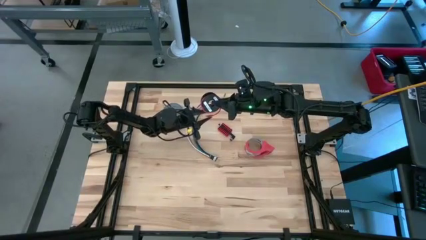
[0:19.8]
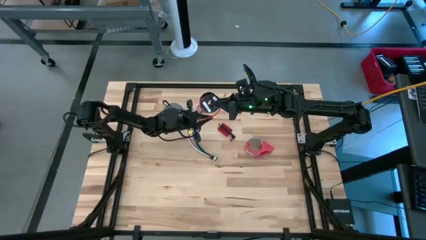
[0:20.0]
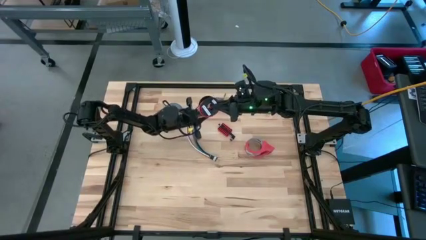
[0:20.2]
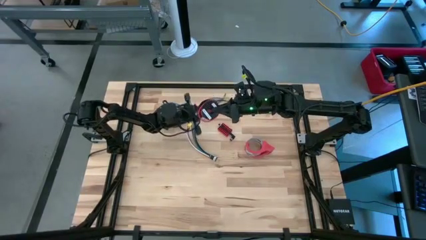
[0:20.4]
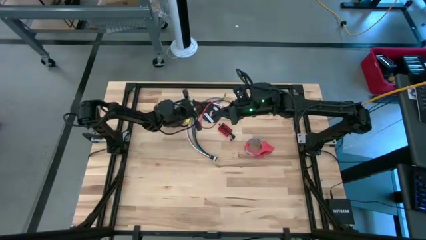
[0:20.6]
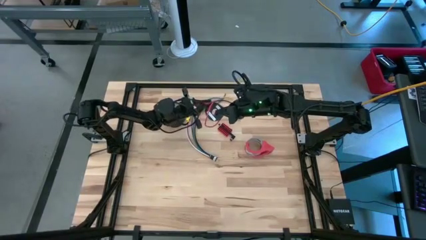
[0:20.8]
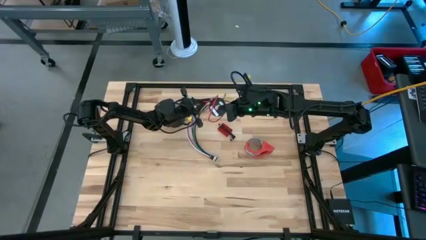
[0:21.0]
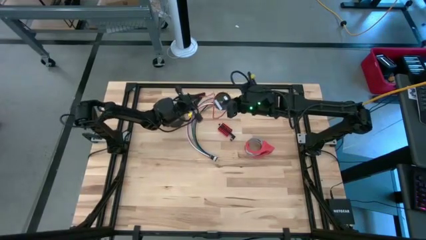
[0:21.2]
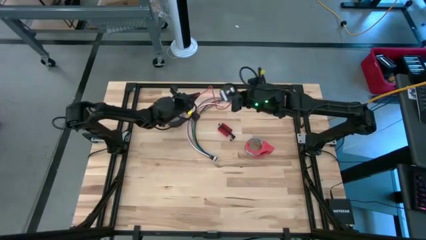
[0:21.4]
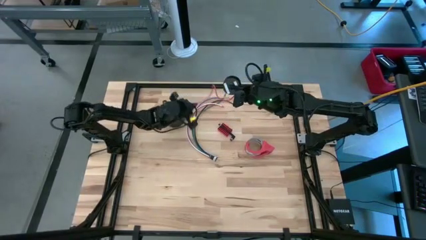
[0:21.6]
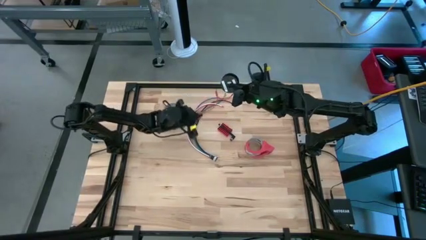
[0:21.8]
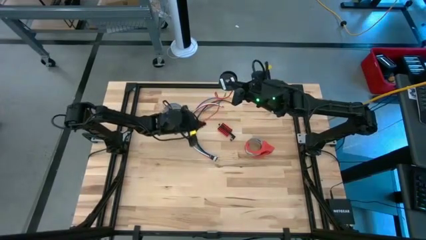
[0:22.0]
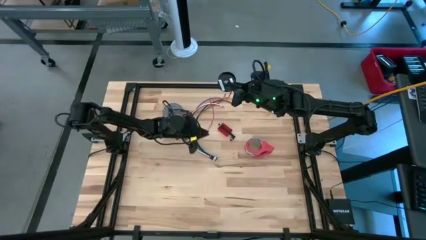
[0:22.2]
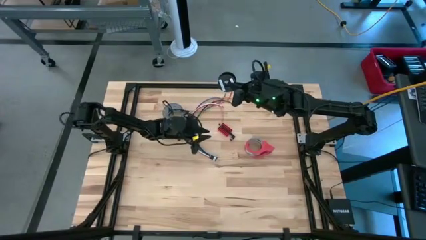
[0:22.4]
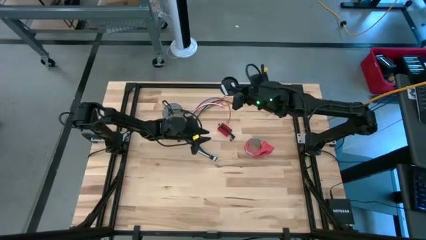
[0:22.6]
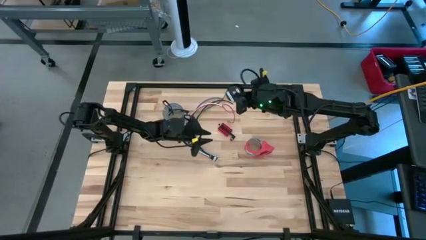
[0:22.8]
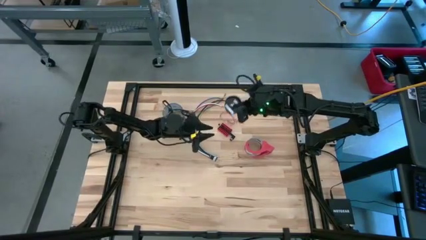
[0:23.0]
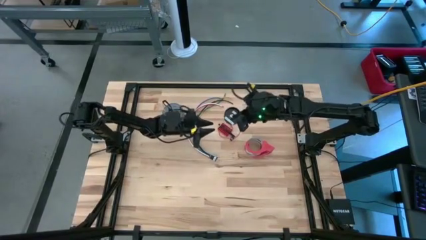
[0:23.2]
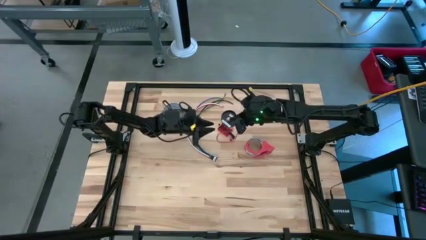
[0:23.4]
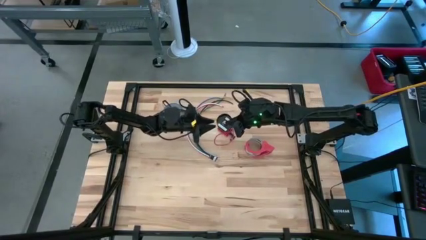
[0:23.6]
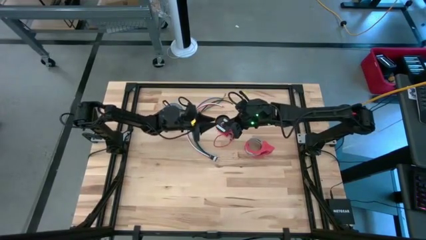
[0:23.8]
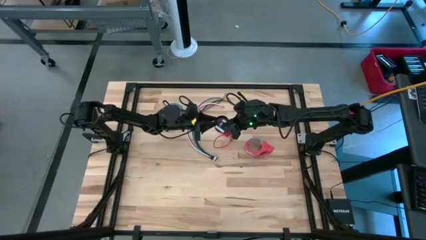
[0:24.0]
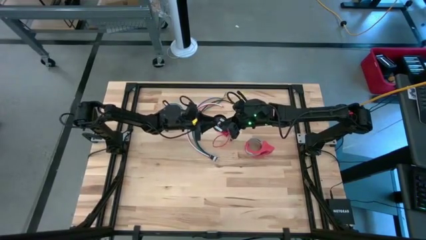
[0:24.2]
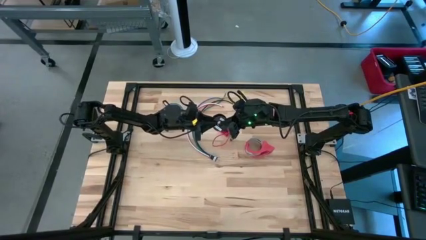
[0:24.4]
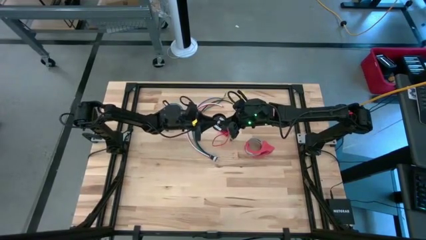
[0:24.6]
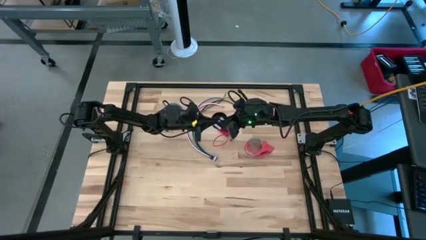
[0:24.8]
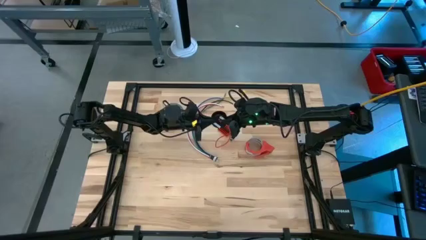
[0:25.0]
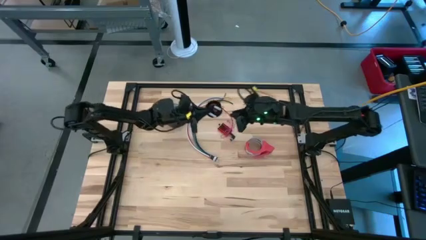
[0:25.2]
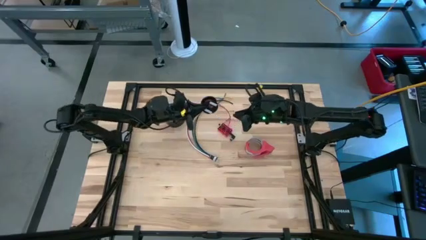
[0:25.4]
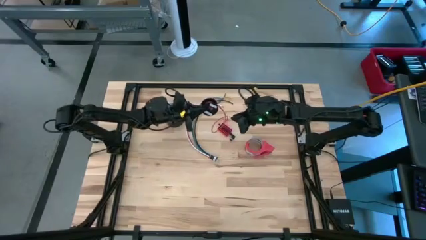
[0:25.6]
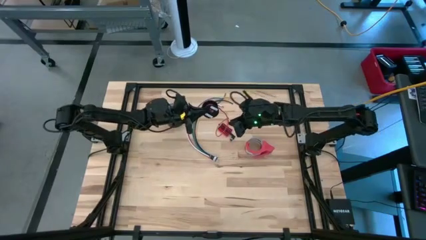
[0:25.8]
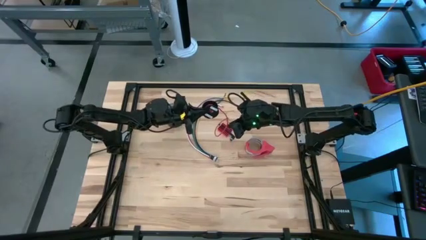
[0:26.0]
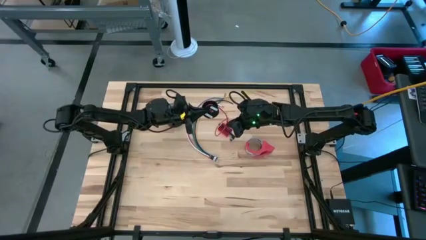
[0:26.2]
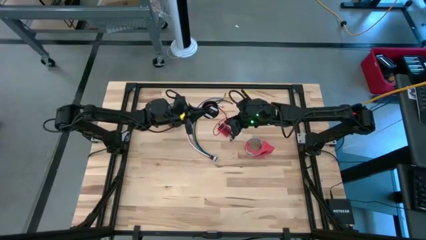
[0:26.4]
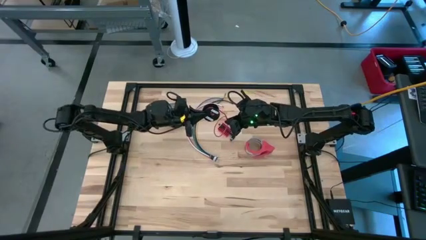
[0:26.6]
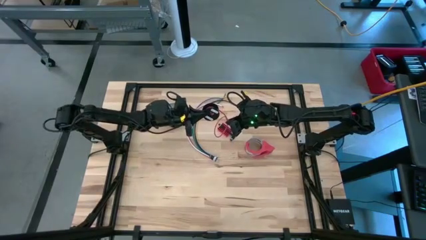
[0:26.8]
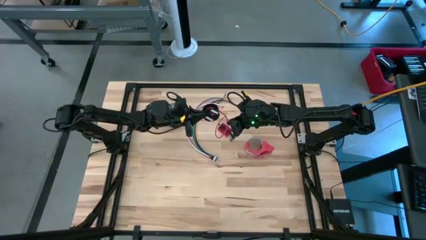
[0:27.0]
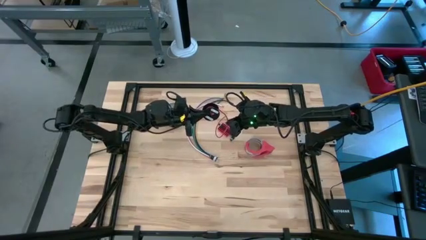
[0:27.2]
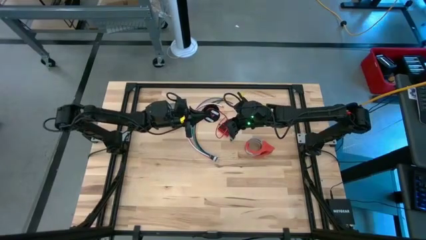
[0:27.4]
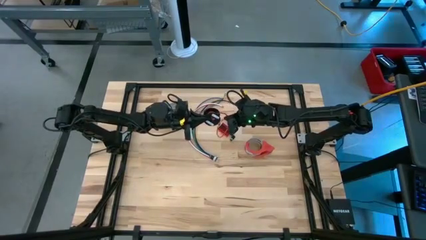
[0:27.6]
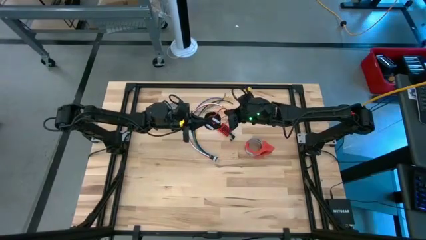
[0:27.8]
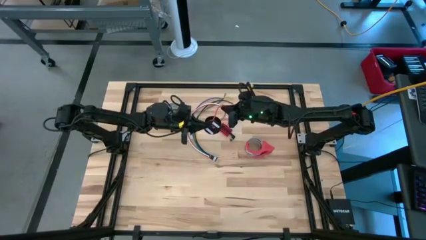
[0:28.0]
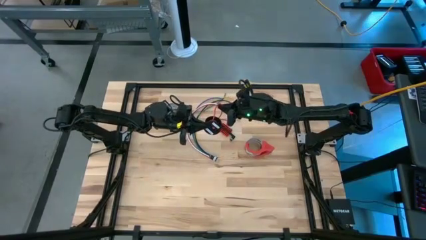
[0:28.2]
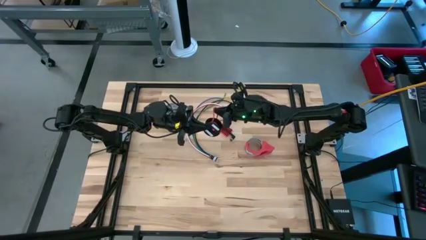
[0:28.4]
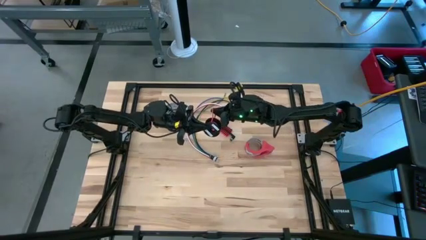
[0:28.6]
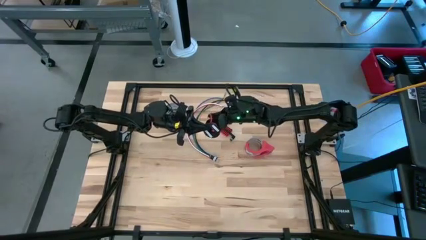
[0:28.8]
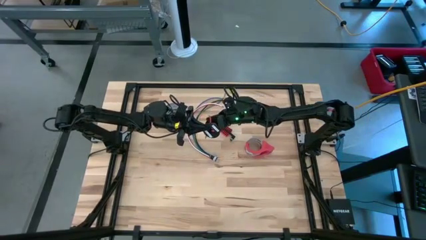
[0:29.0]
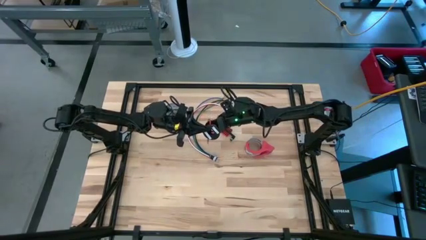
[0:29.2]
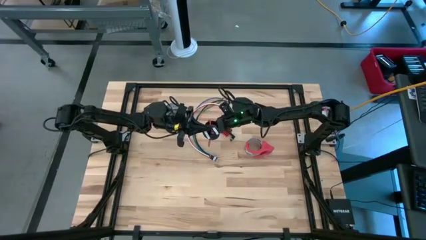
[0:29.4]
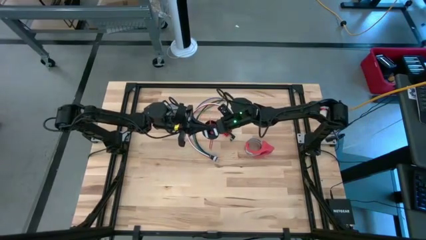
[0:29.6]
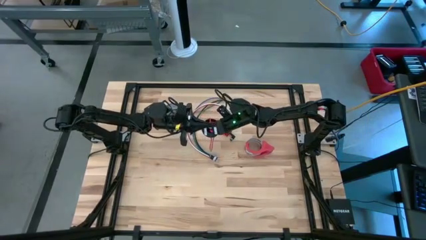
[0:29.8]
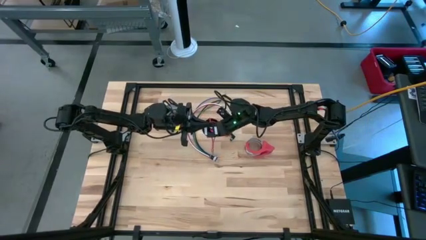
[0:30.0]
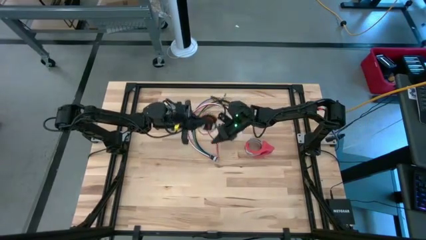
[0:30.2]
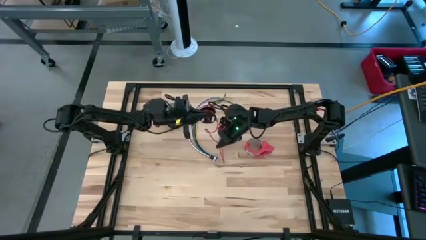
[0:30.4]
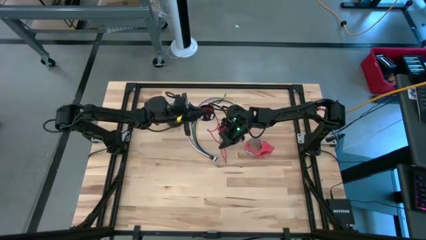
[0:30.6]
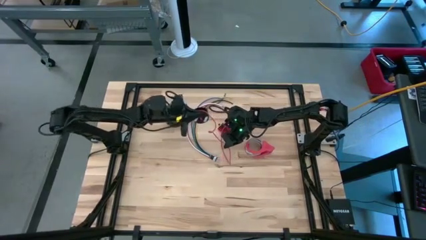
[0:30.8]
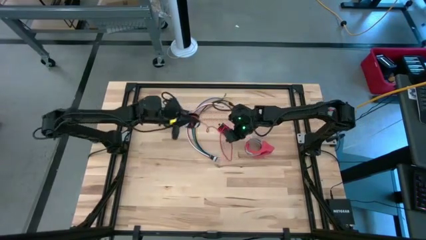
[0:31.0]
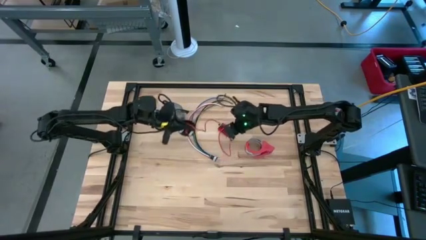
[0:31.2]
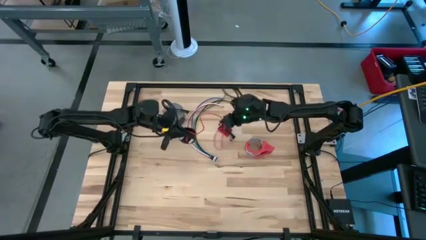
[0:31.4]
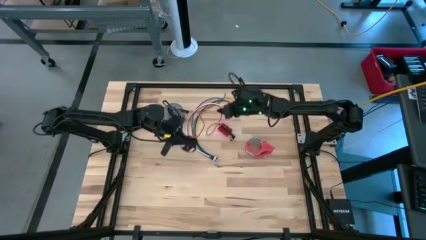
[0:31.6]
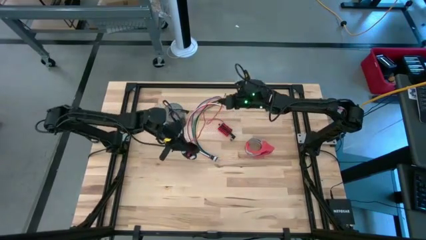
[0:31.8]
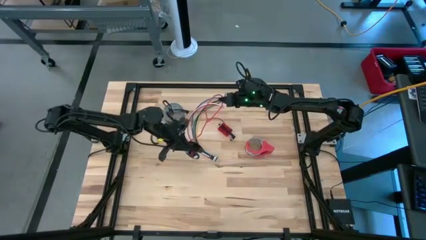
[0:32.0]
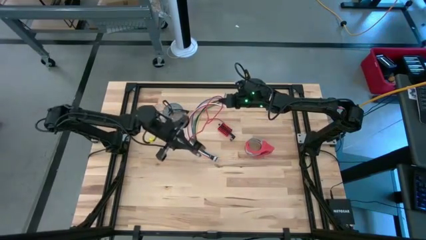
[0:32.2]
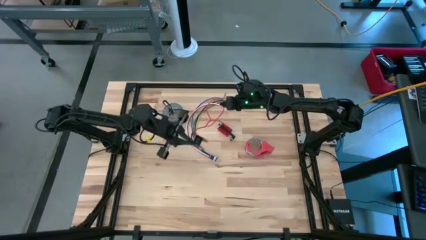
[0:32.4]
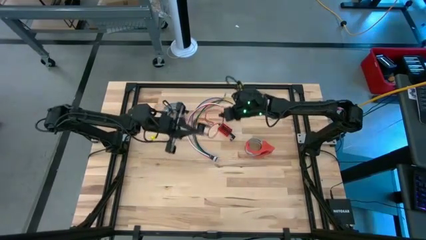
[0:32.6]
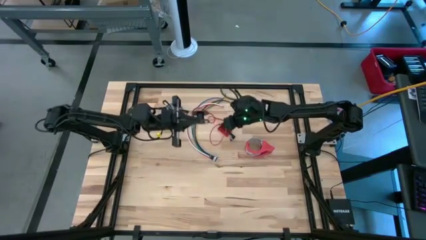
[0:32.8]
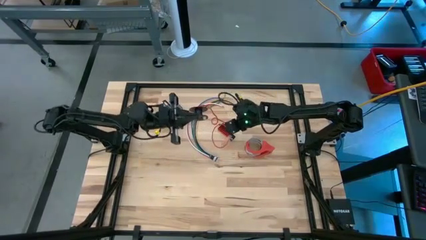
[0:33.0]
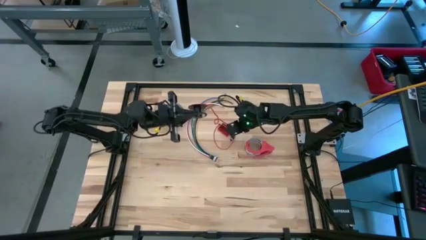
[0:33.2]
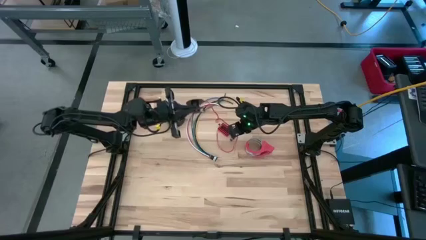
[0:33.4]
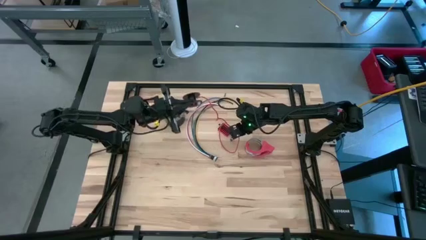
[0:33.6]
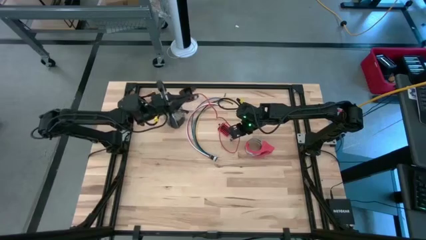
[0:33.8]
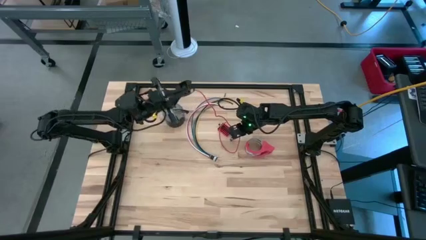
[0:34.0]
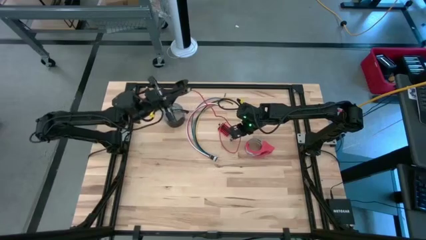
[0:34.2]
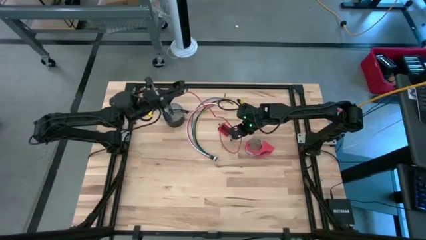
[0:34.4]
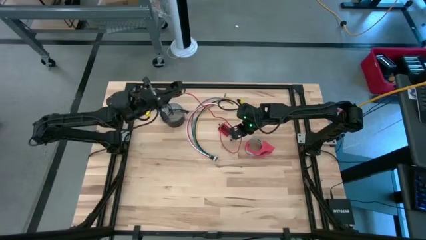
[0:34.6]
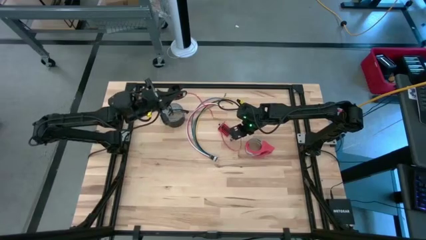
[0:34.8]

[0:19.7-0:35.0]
Task: Coil cords
Uncoil the red wire from the black spool
